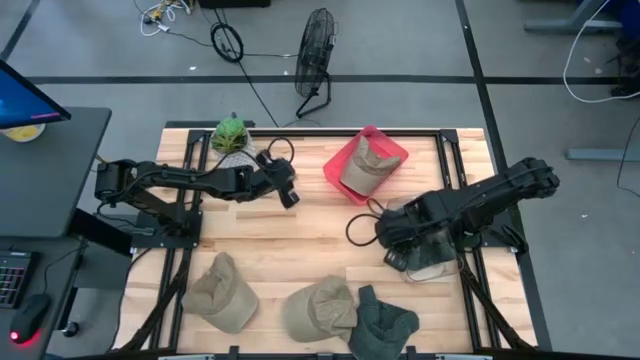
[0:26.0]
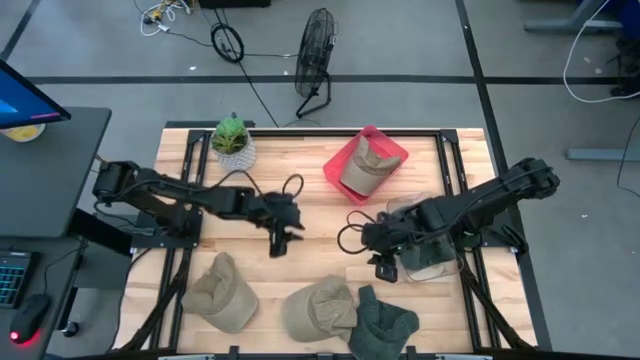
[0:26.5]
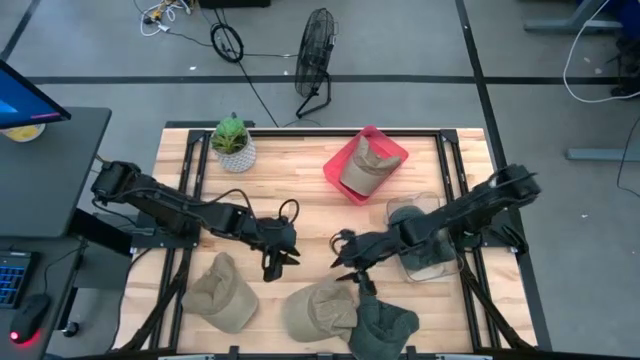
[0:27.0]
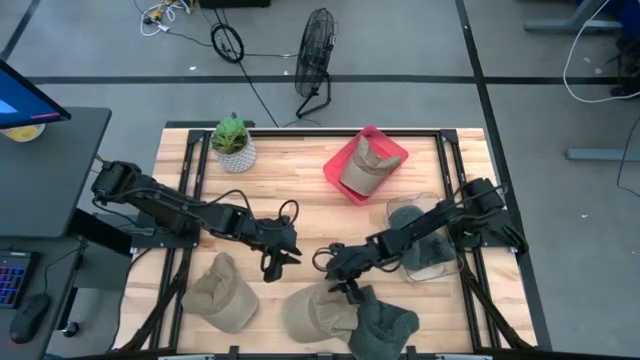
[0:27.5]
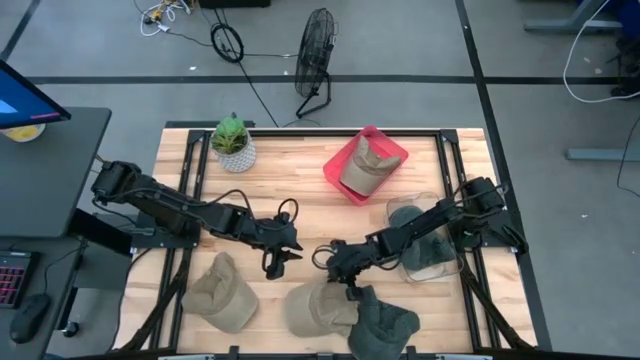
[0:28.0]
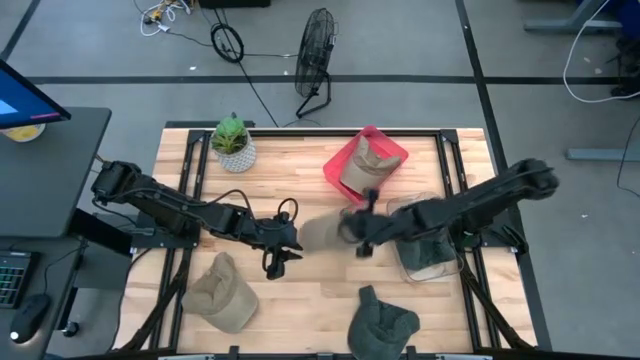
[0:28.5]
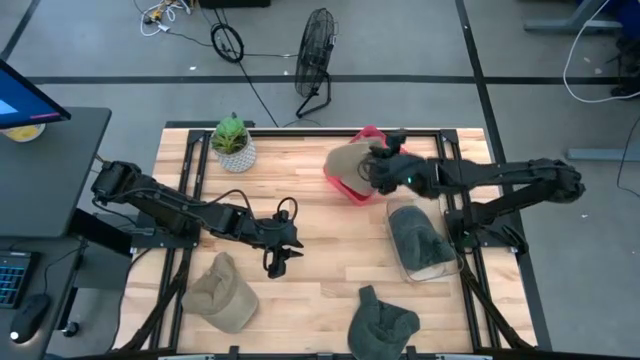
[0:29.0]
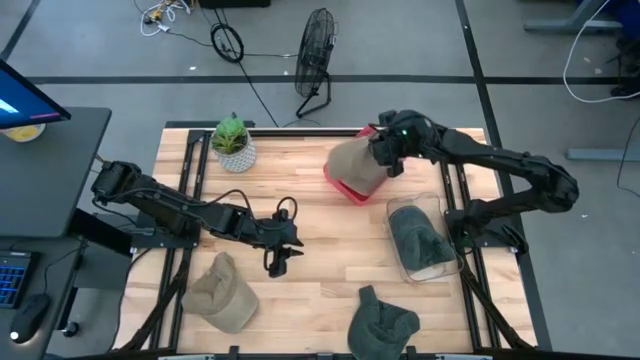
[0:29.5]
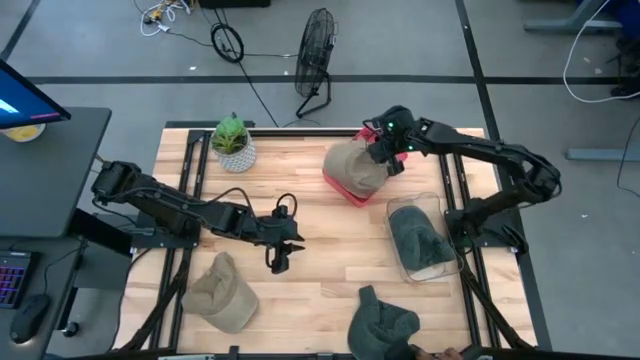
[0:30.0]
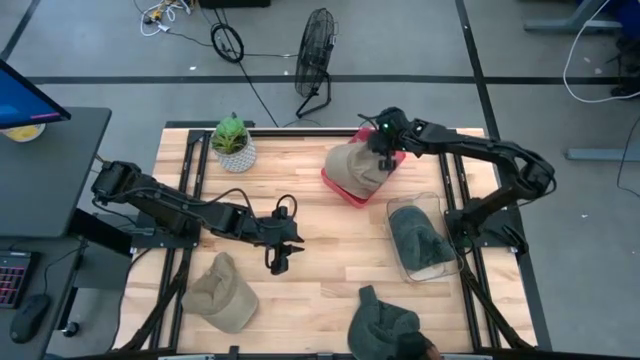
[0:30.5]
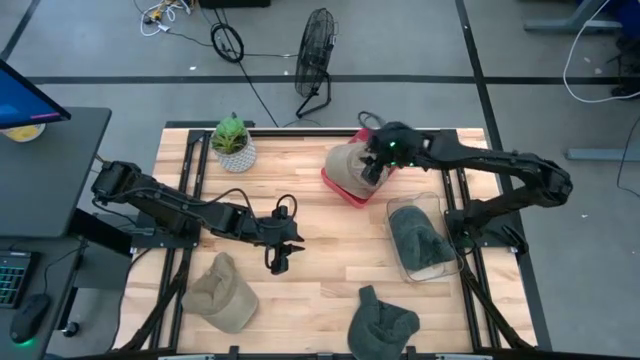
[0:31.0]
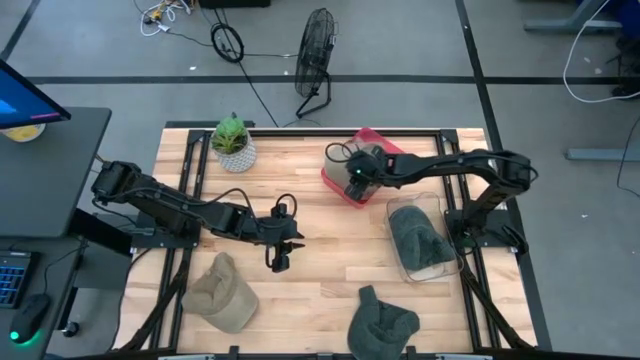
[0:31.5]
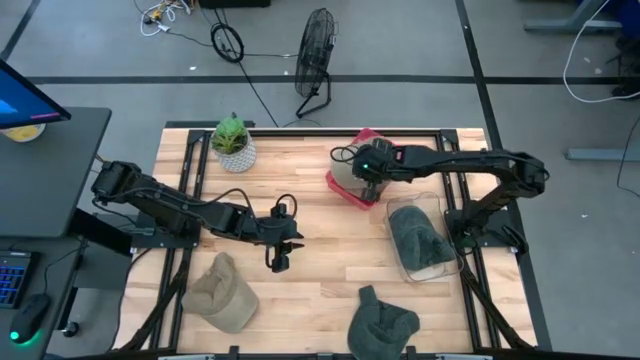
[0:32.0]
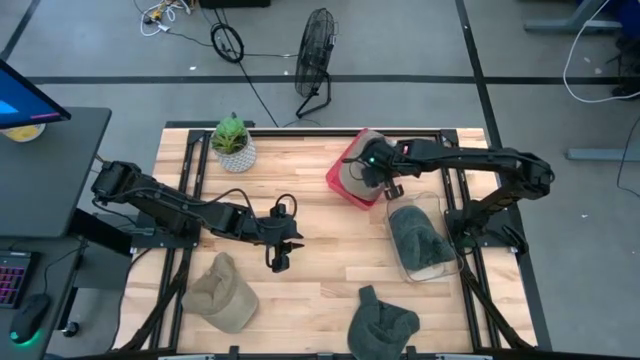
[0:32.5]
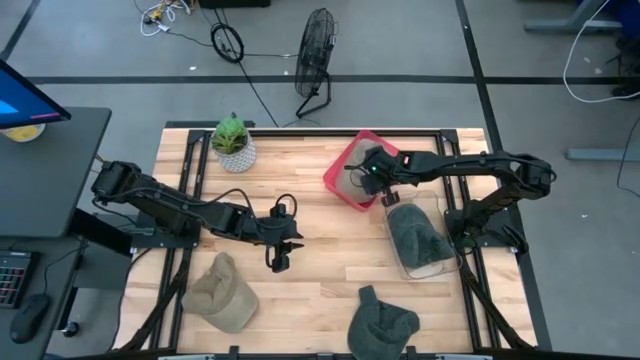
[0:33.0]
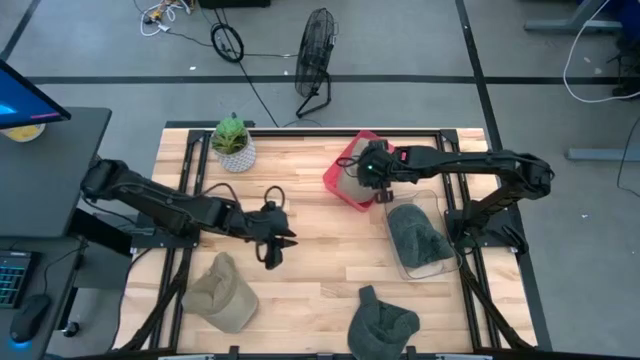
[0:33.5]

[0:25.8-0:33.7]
Task: Pick & Place hat
Put the right brown cap into the red bin

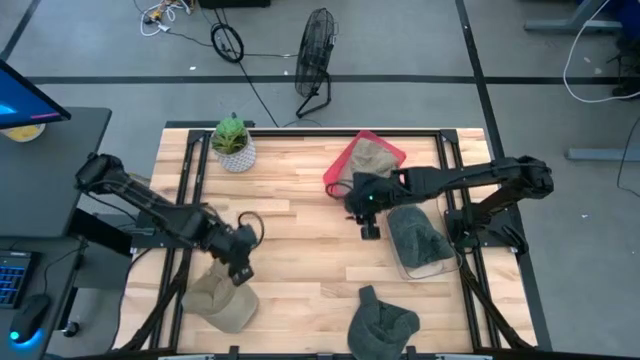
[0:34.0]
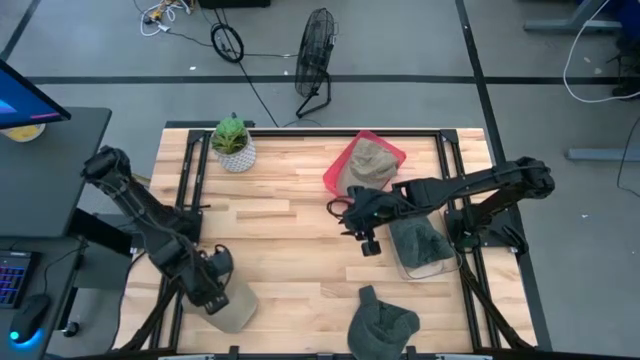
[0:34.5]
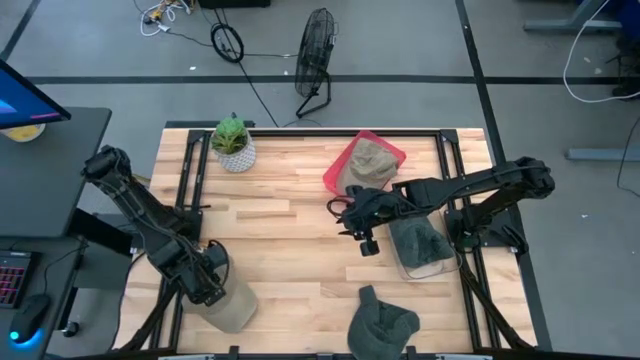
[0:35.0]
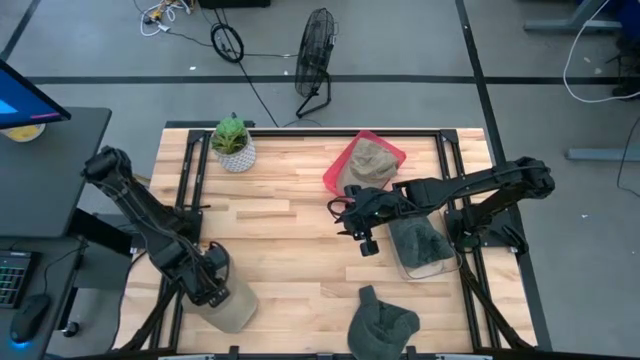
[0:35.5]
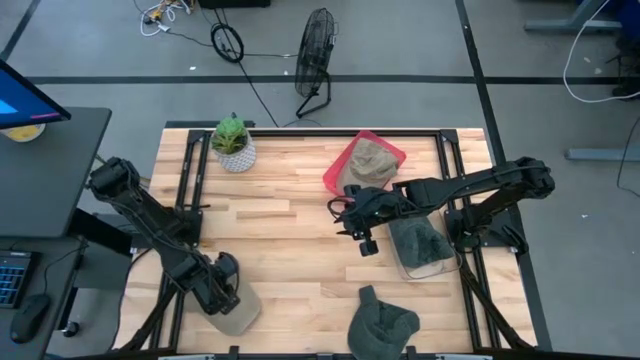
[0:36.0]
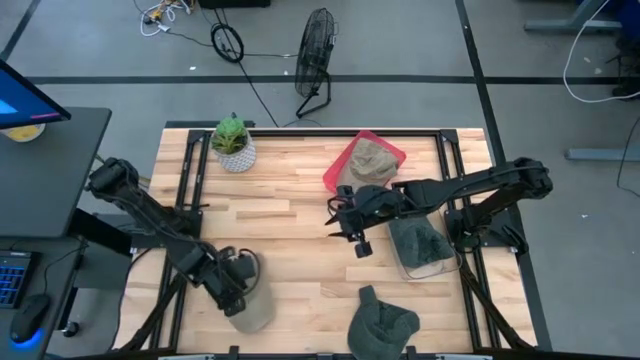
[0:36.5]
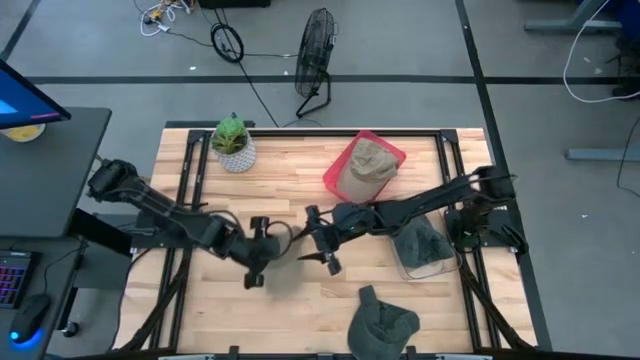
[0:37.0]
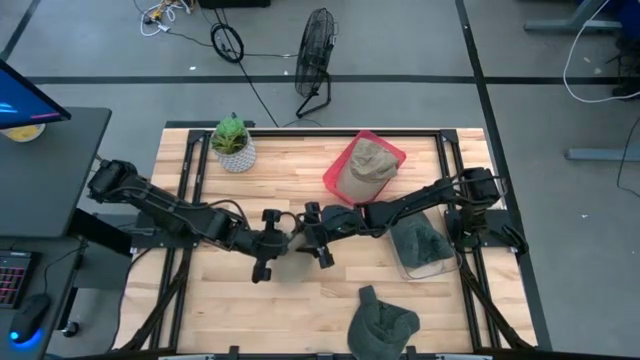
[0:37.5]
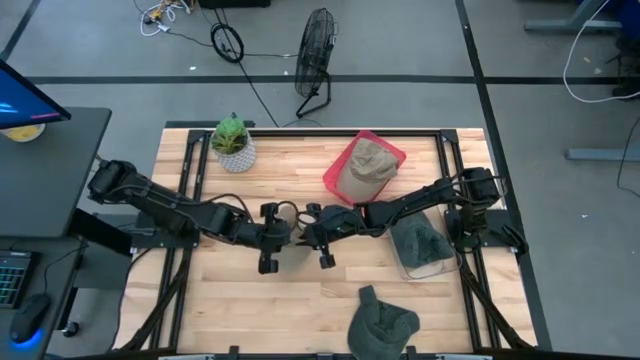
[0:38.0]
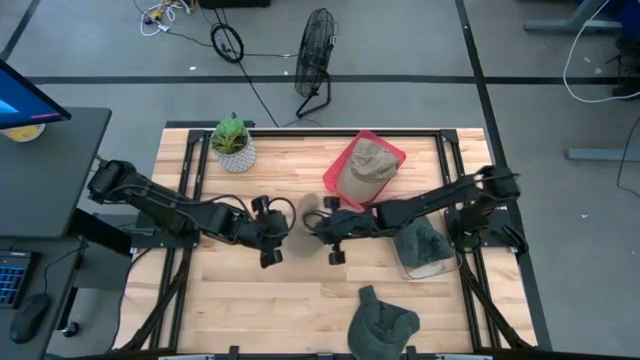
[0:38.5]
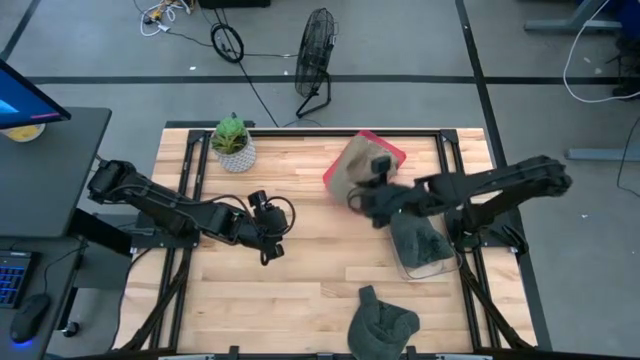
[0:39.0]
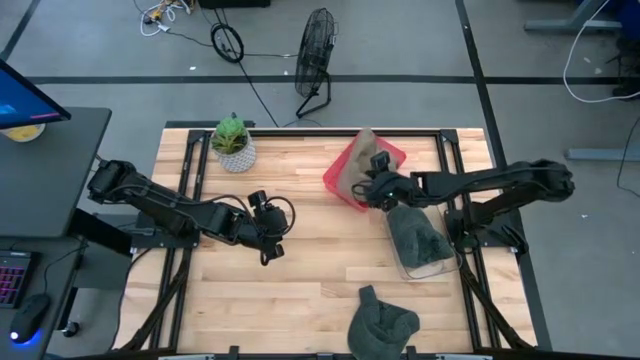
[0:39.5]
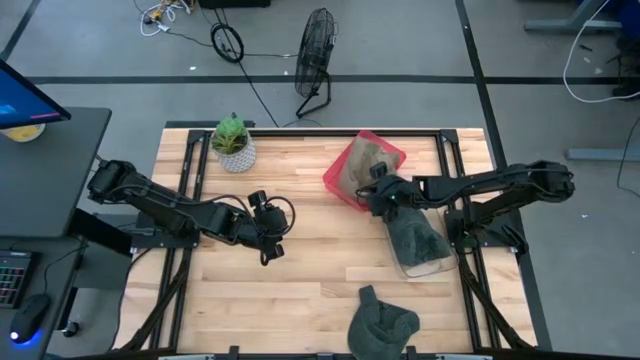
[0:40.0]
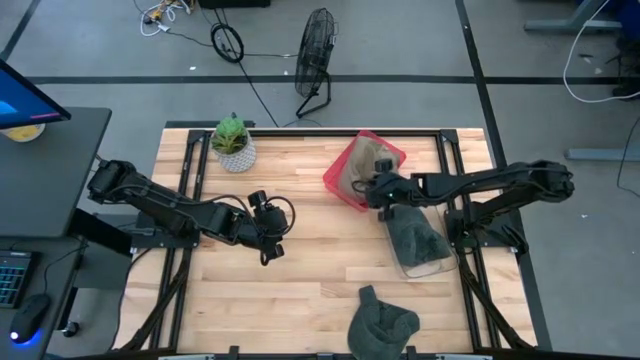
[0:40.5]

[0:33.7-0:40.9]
Put the brown cap into the red bin

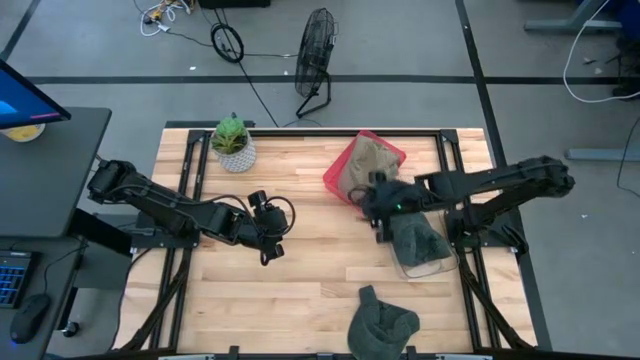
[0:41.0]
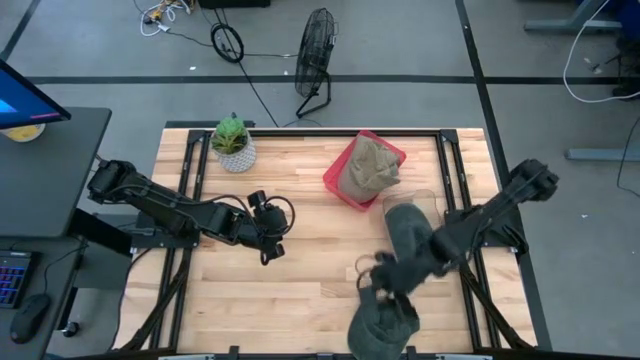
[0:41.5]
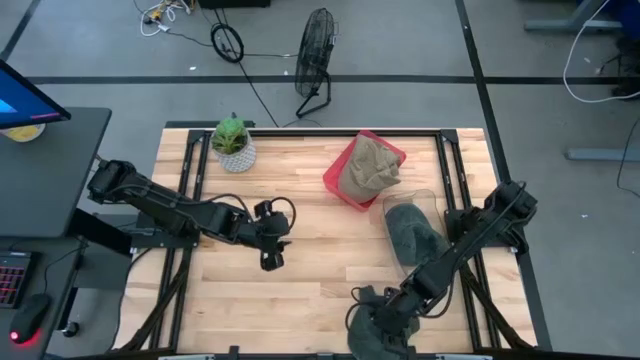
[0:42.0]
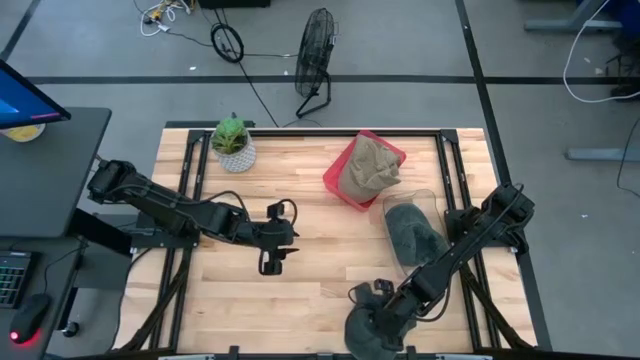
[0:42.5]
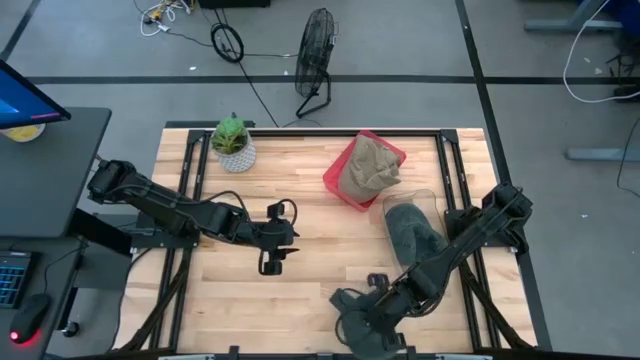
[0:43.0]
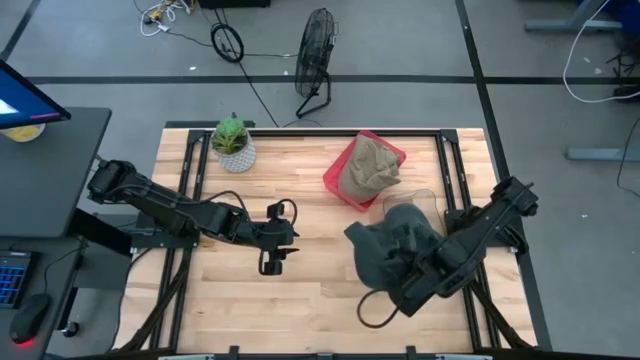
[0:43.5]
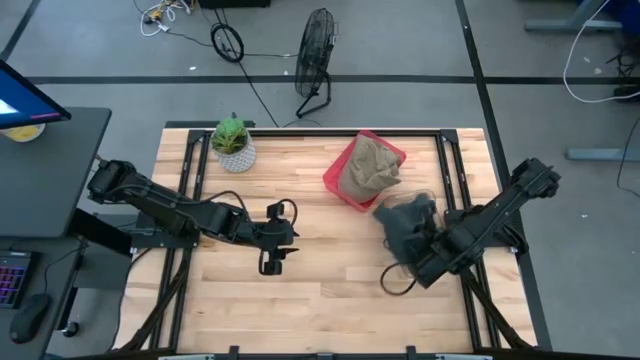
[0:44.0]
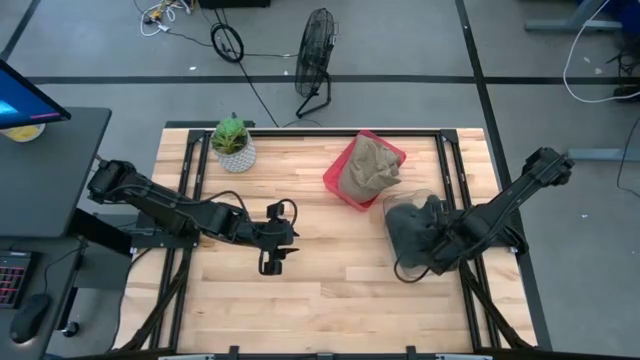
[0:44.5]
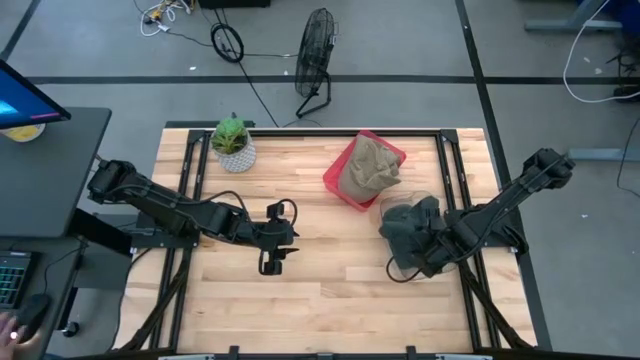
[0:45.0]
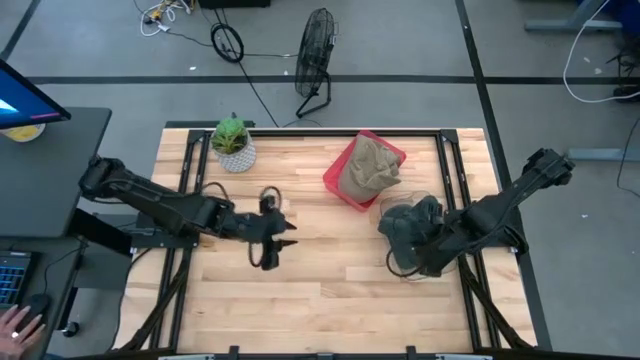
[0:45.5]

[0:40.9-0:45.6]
Put the gray cap into the transparent bin

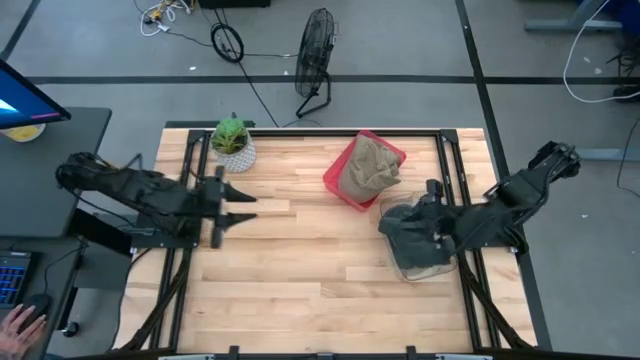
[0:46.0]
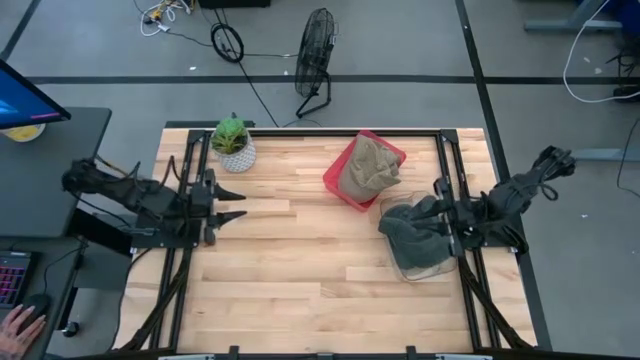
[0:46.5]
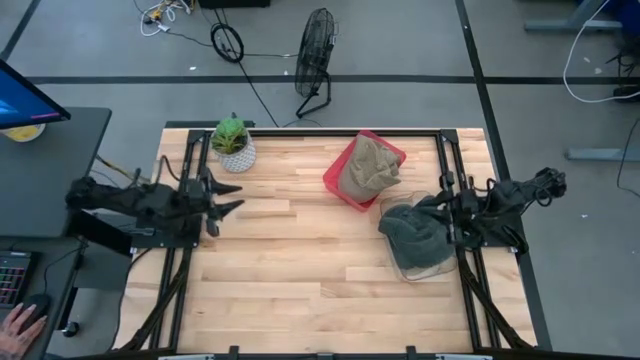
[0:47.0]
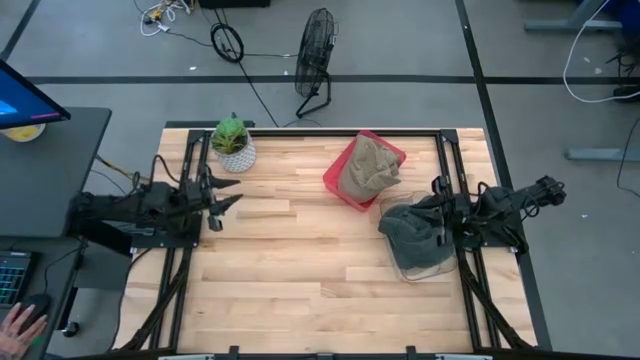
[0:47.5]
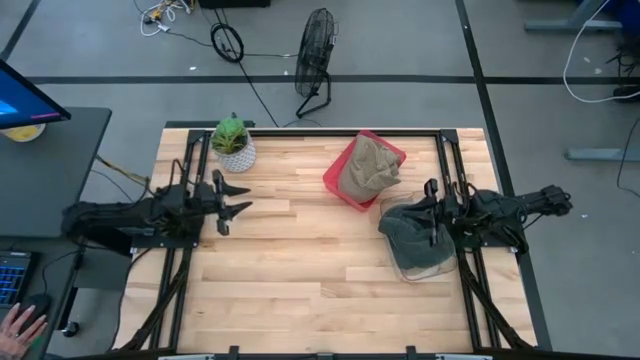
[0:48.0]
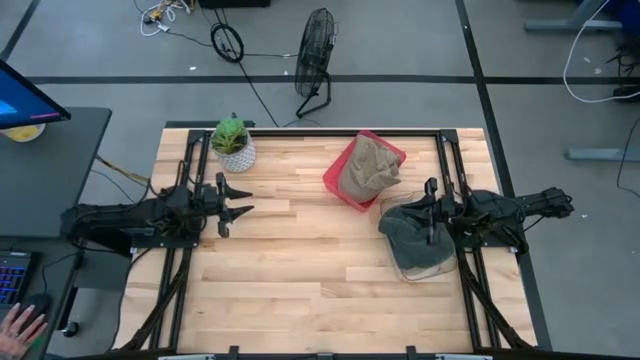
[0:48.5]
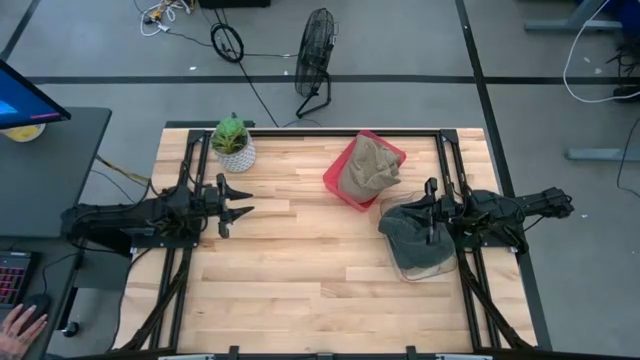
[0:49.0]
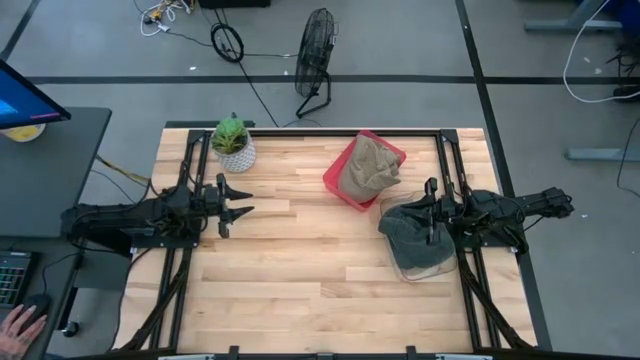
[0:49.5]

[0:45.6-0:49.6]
Return to Home Position
